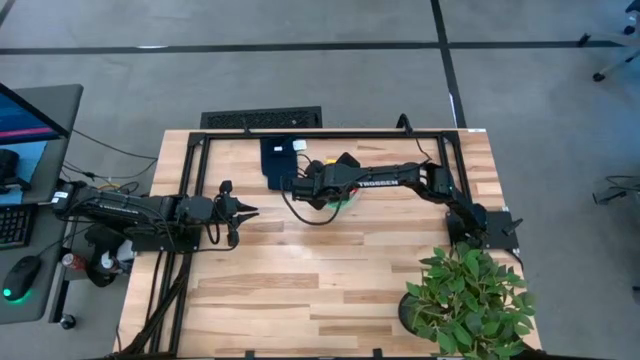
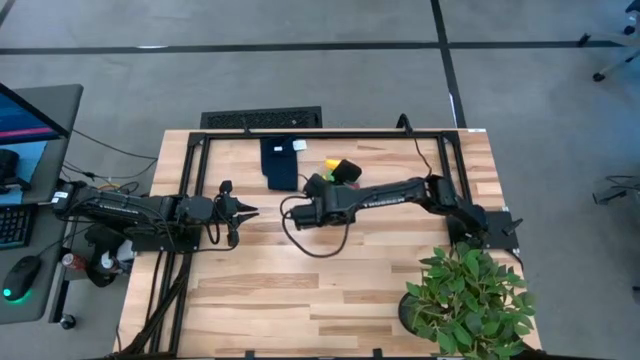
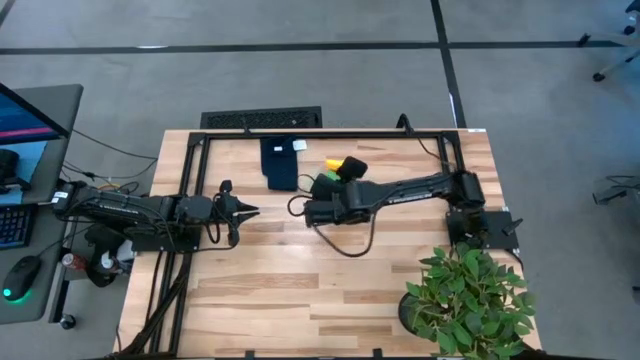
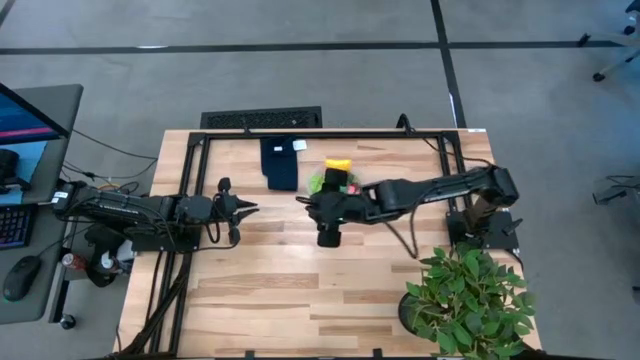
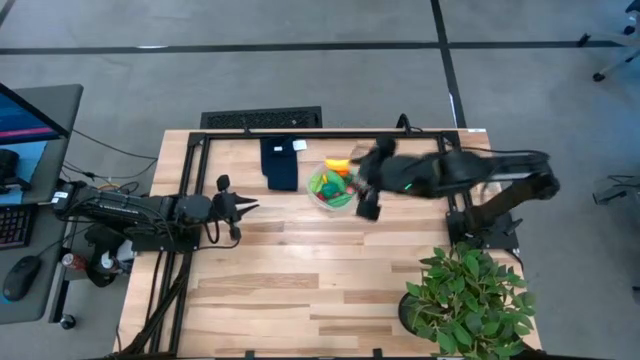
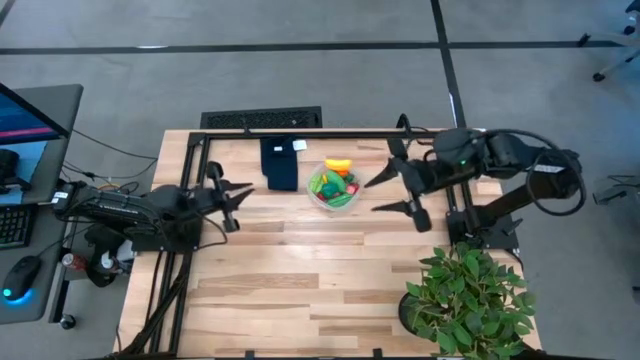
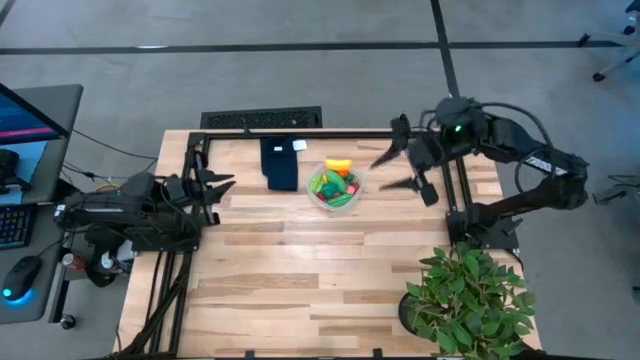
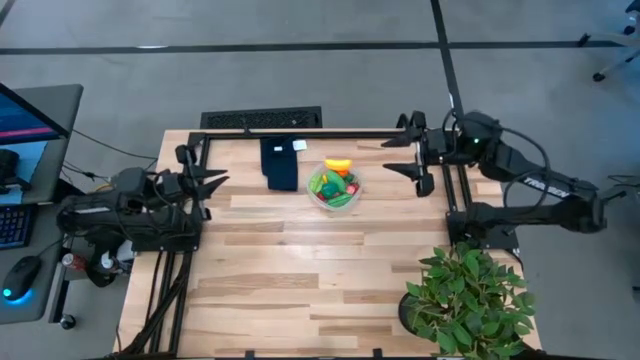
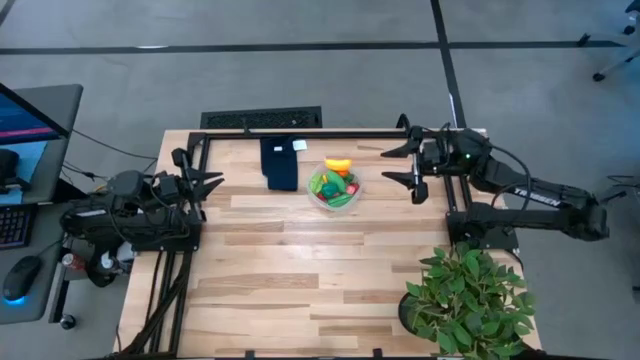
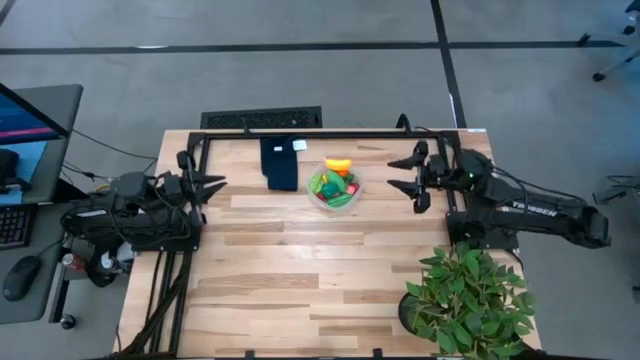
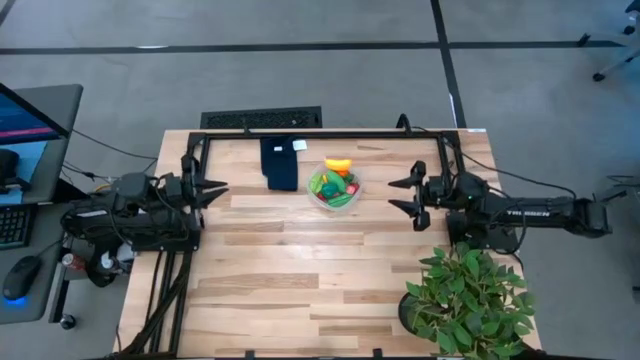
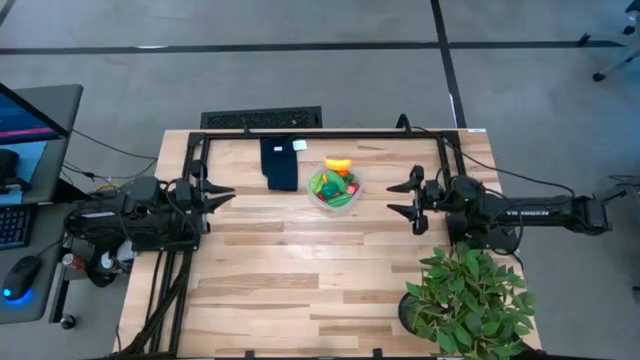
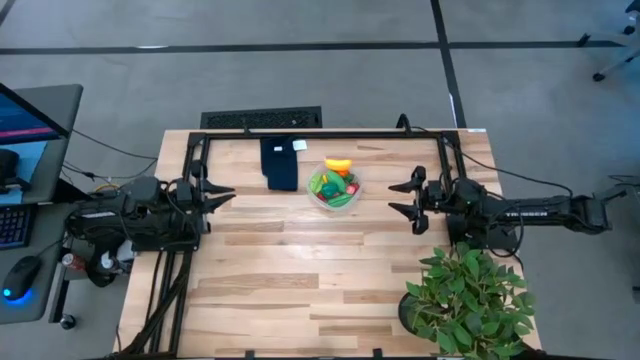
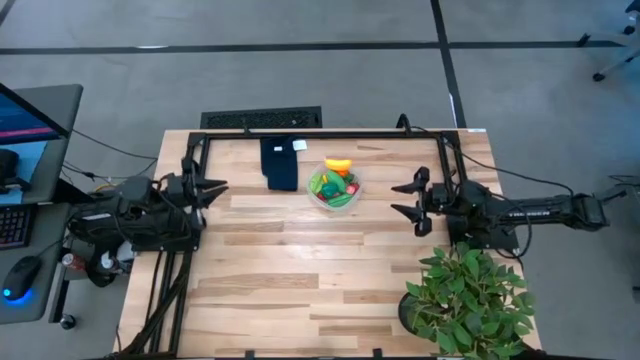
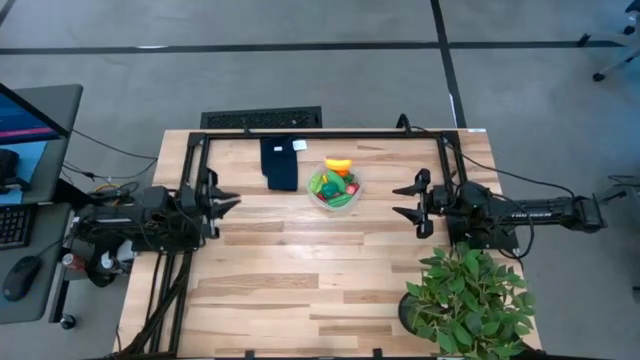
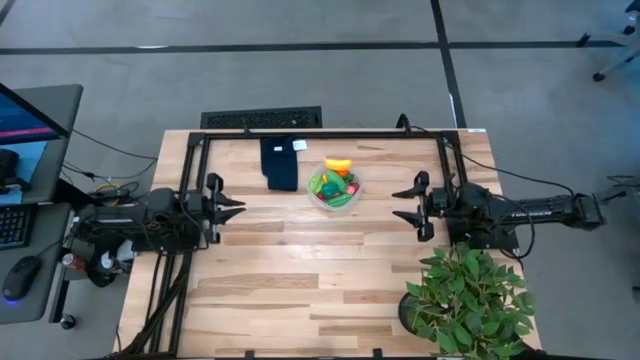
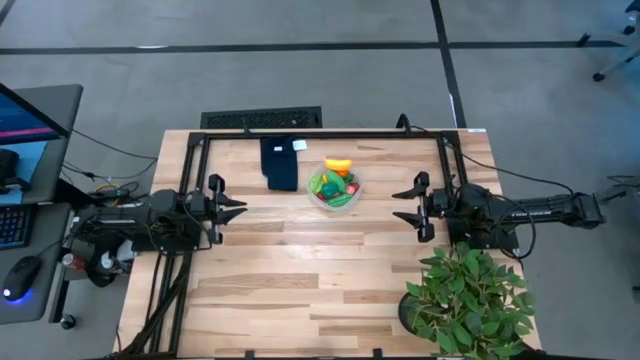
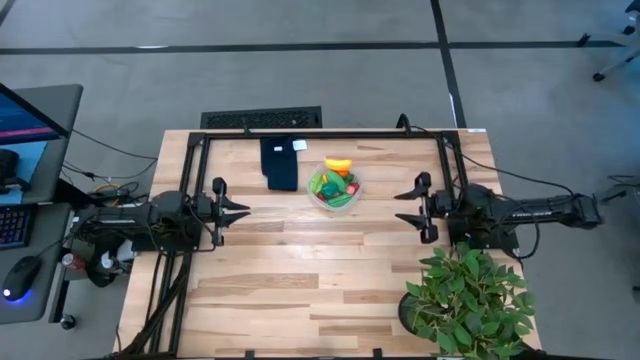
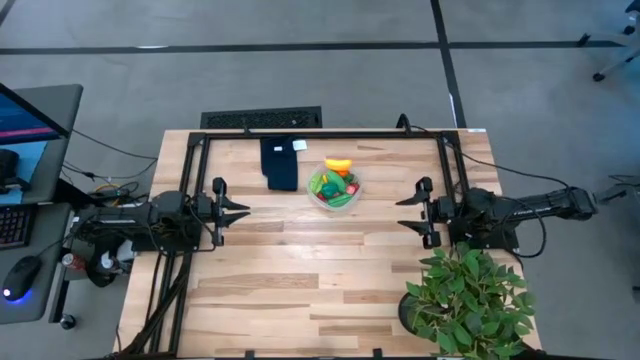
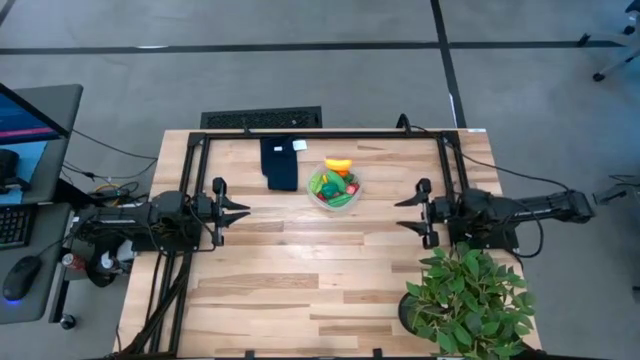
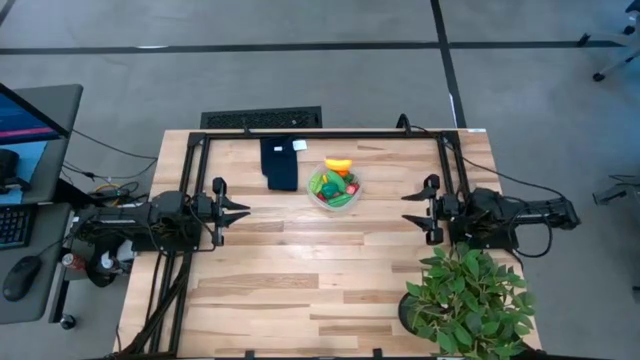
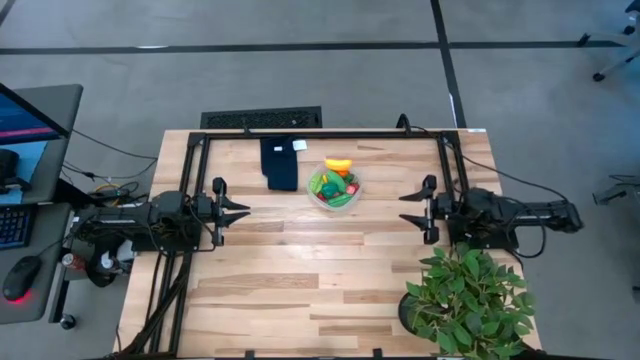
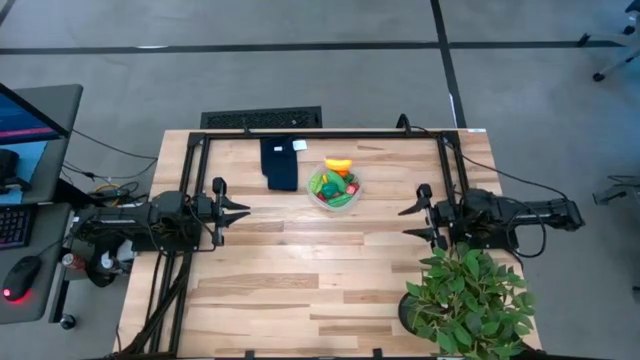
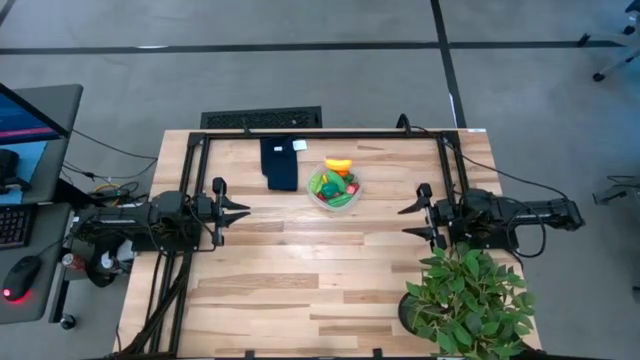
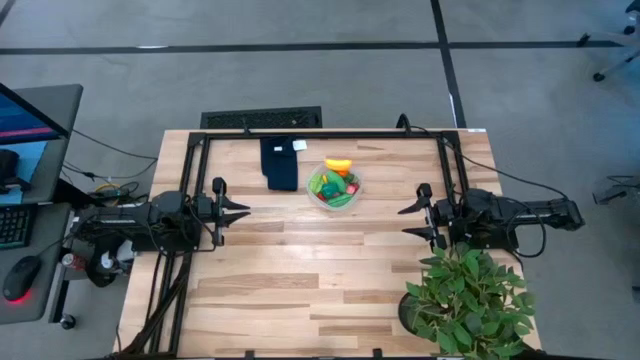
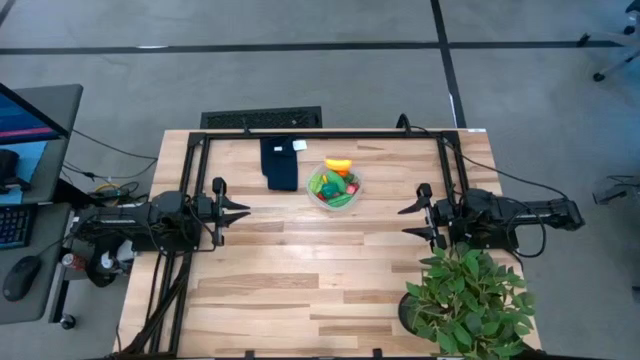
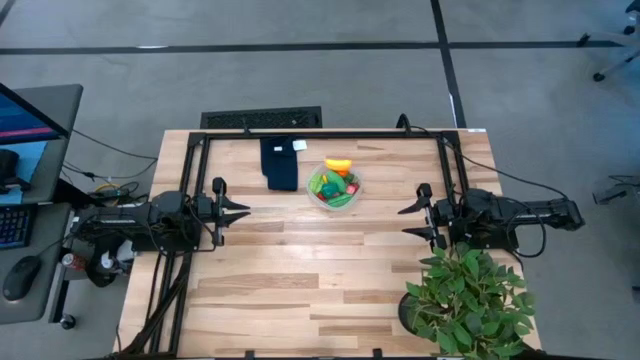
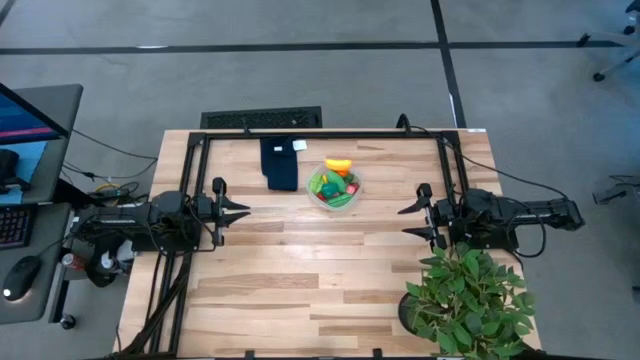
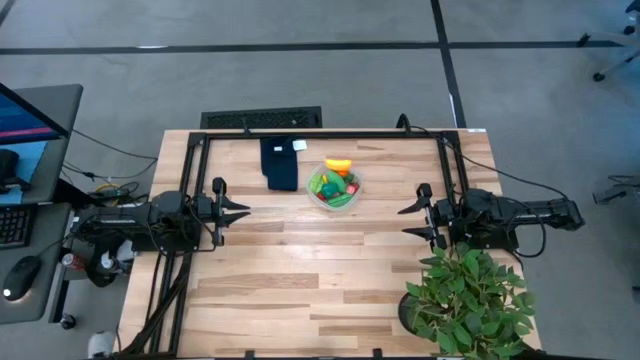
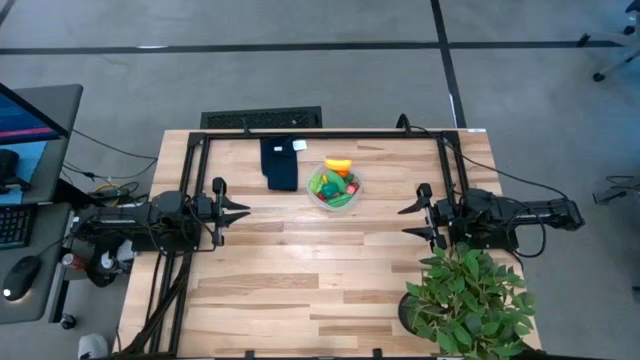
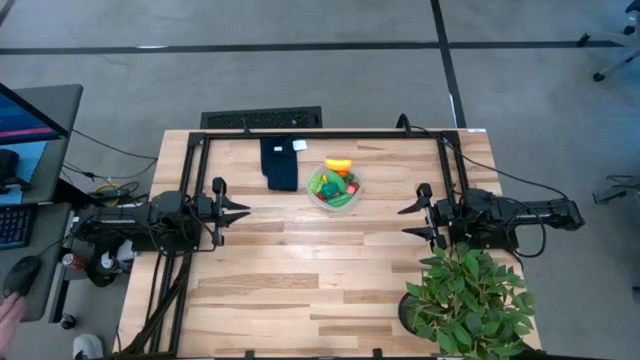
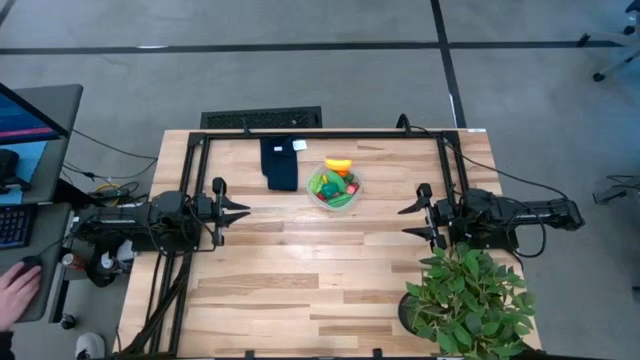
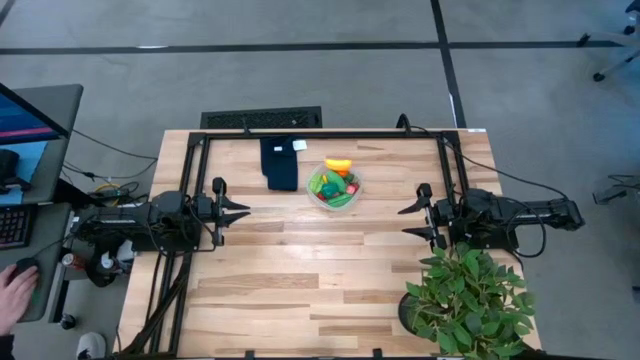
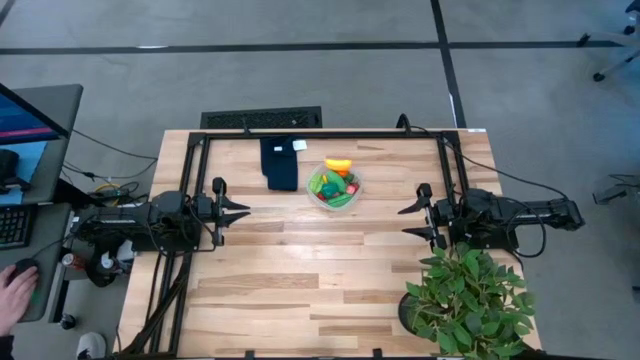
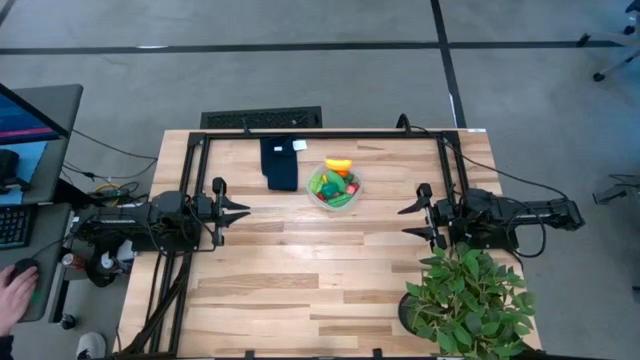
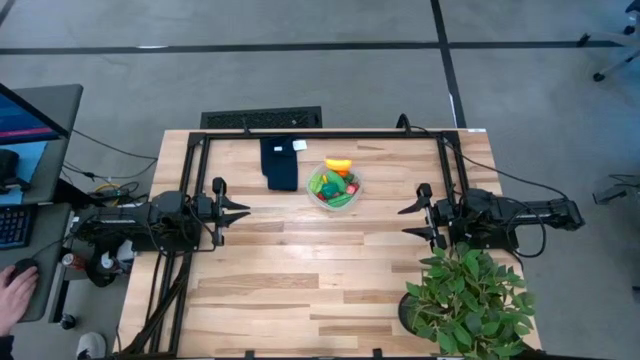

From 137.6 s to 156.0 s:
Task: Pick and placing Produce into tupperware
Return to Home Position

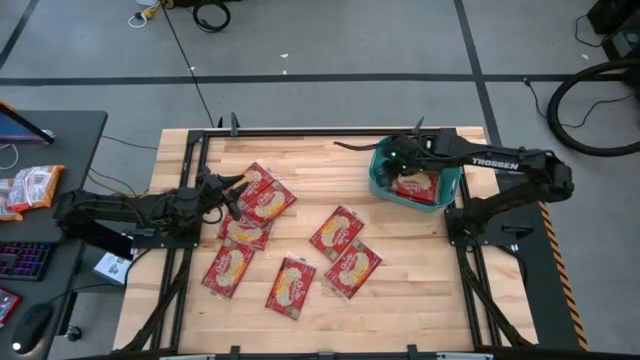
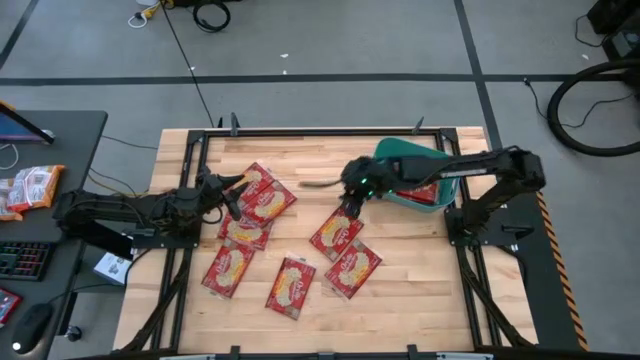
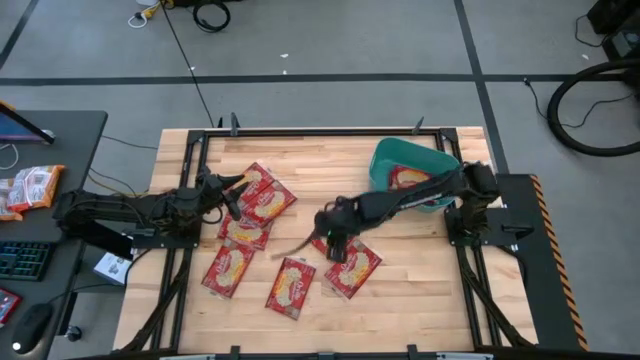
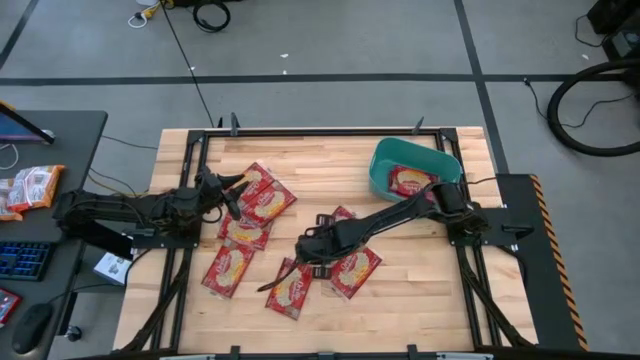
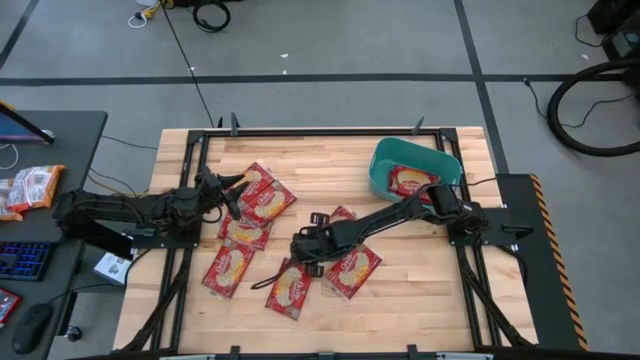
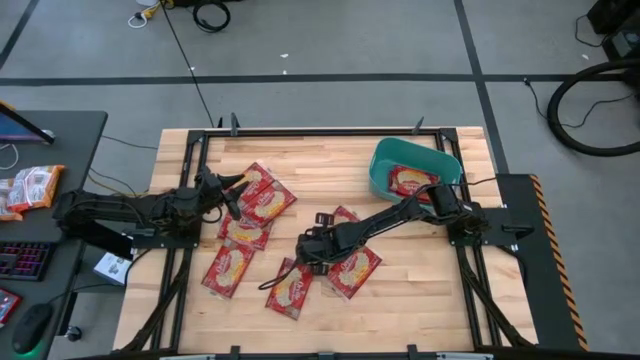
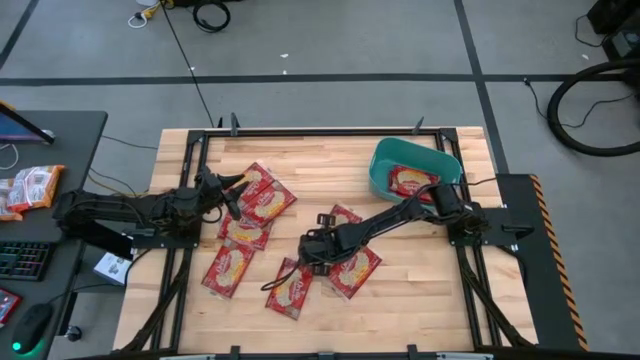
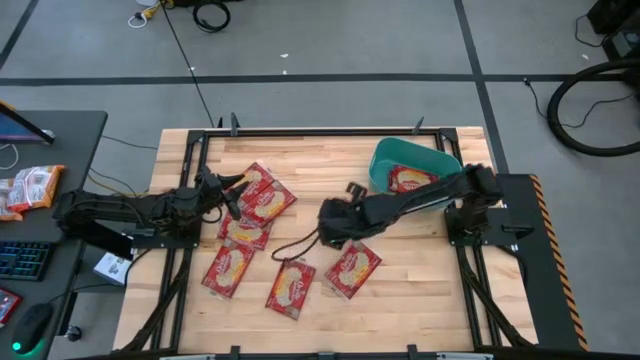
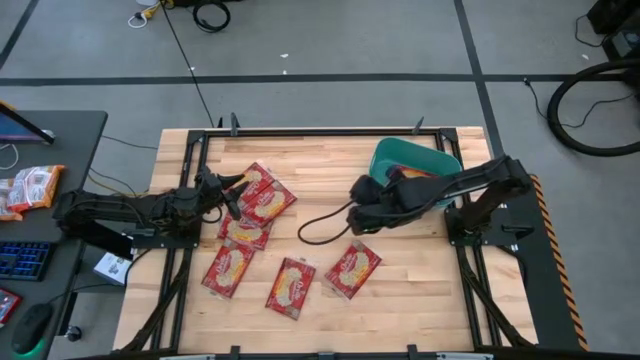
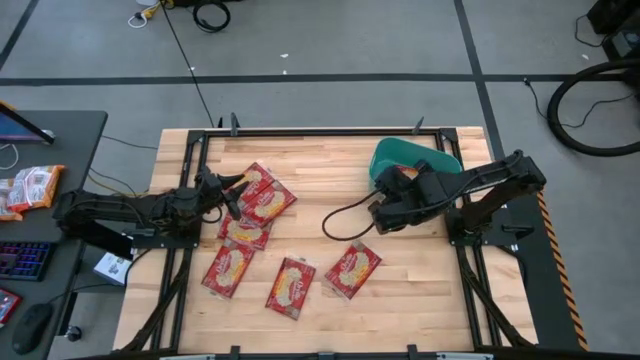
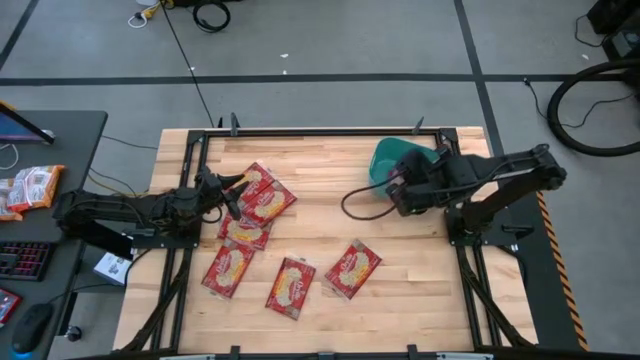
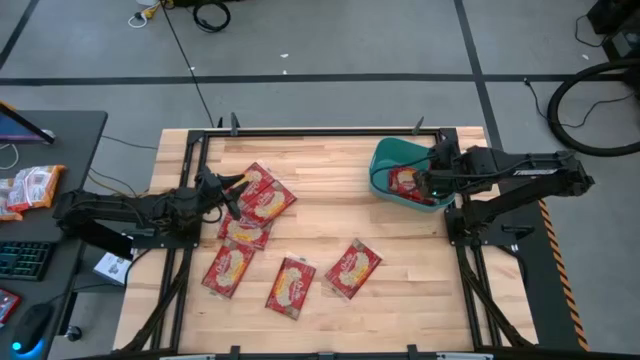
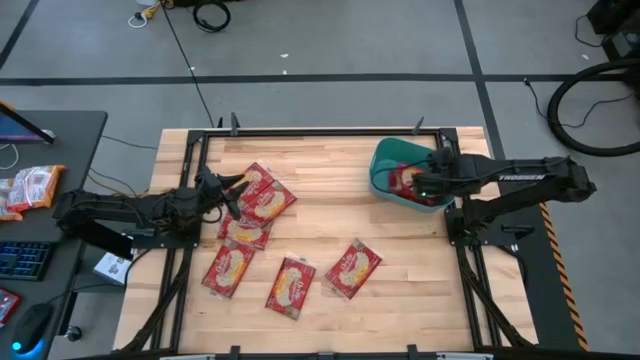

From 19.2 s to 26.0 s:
Task: Sort popcorn bags into baskets
Put the red popcorn bag into the green container
